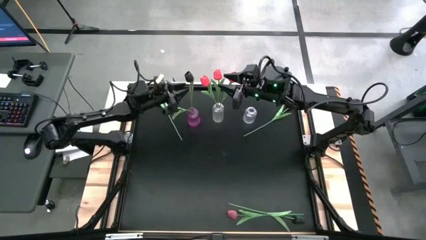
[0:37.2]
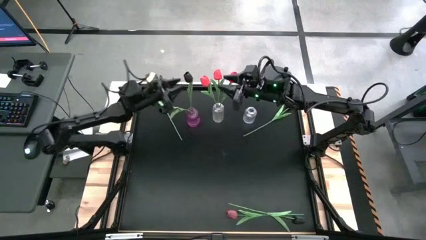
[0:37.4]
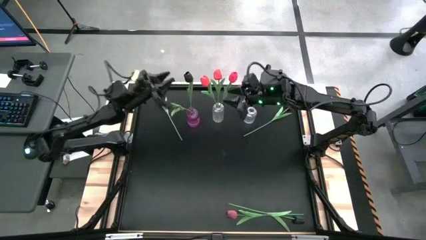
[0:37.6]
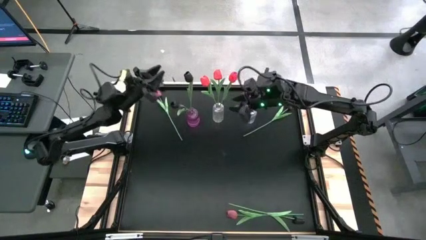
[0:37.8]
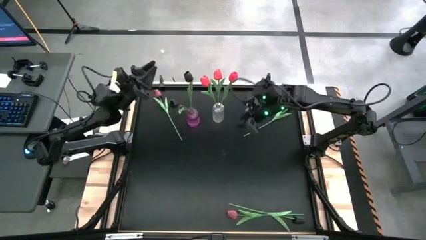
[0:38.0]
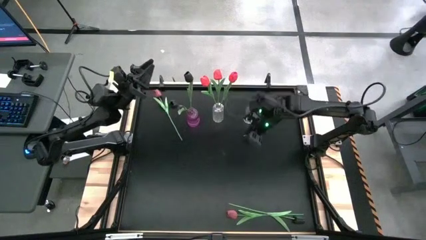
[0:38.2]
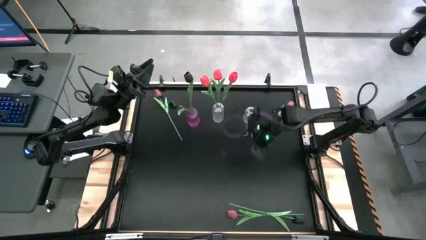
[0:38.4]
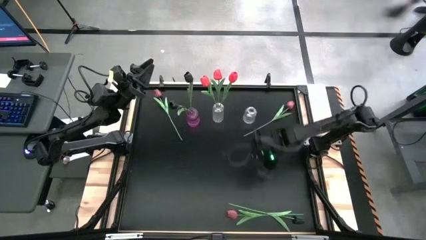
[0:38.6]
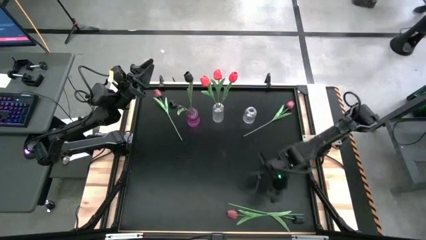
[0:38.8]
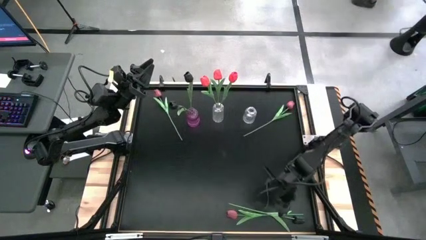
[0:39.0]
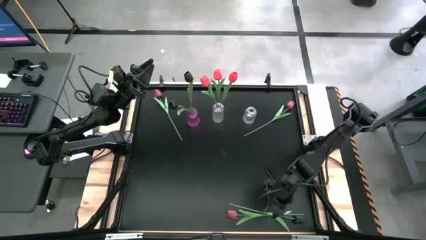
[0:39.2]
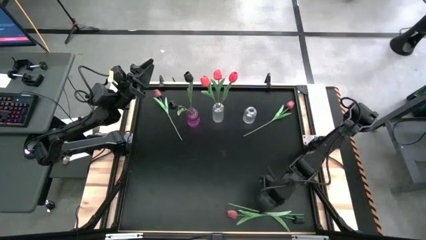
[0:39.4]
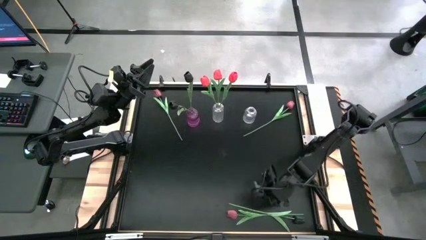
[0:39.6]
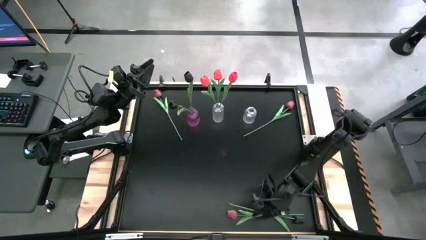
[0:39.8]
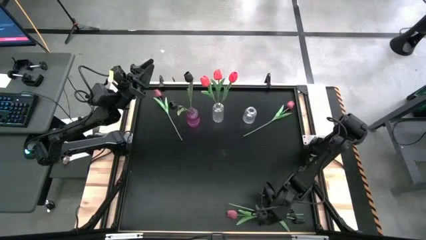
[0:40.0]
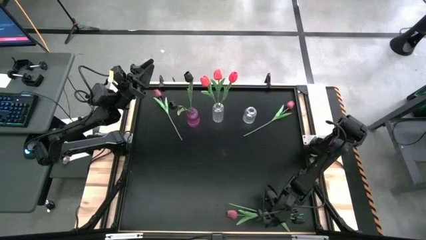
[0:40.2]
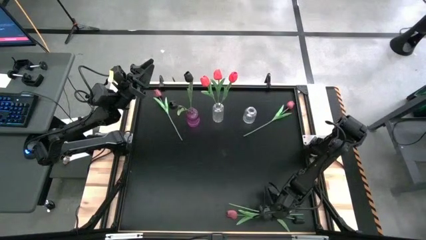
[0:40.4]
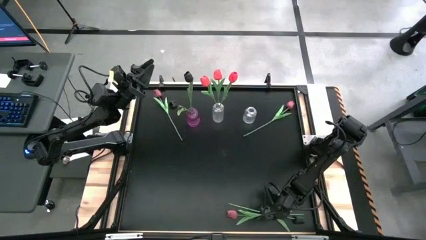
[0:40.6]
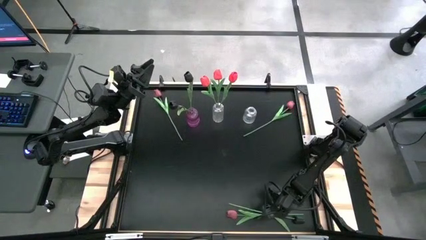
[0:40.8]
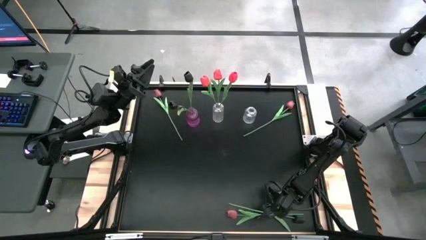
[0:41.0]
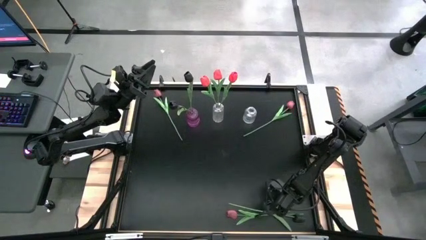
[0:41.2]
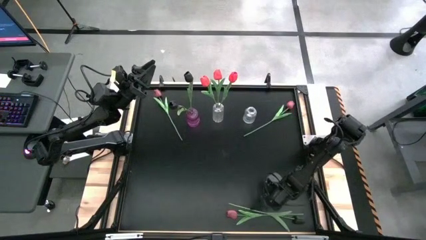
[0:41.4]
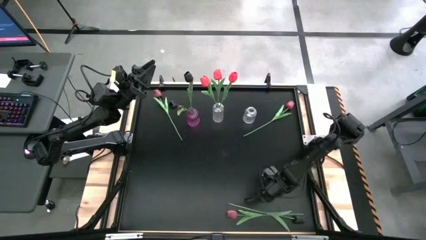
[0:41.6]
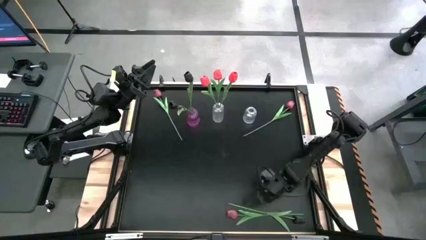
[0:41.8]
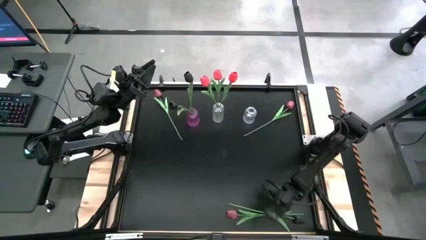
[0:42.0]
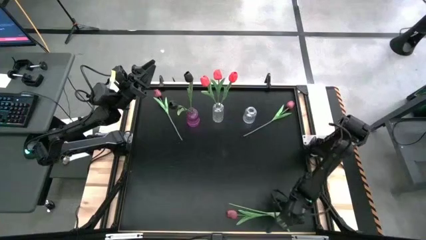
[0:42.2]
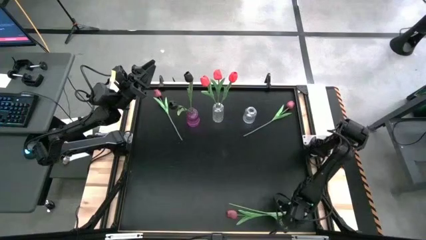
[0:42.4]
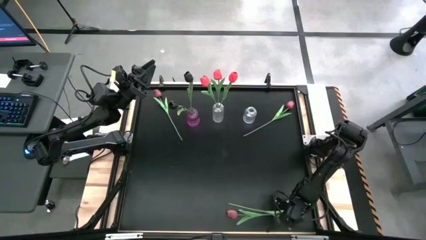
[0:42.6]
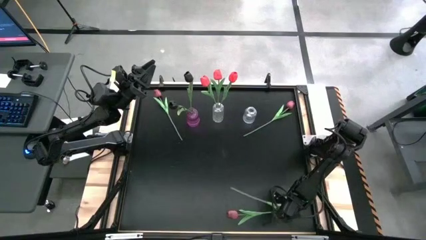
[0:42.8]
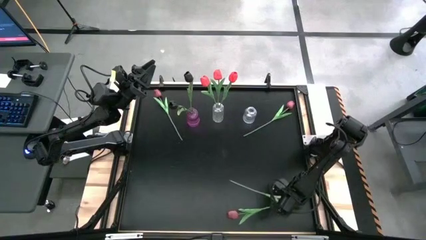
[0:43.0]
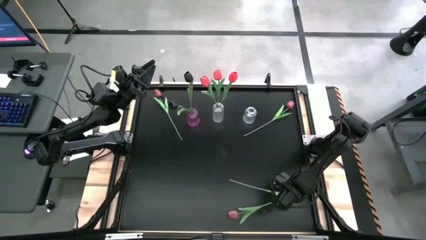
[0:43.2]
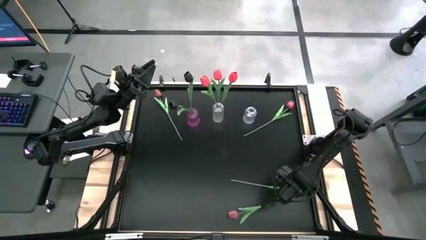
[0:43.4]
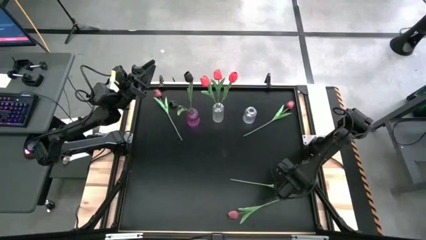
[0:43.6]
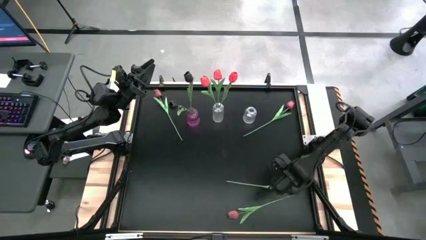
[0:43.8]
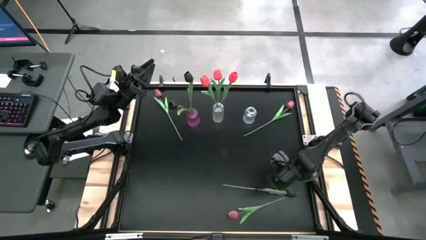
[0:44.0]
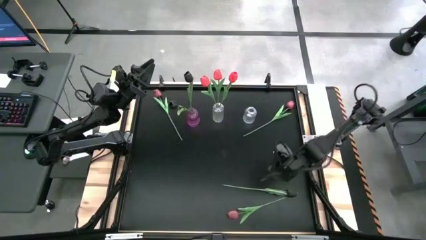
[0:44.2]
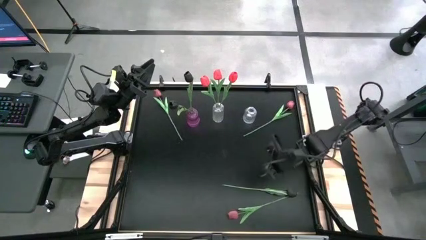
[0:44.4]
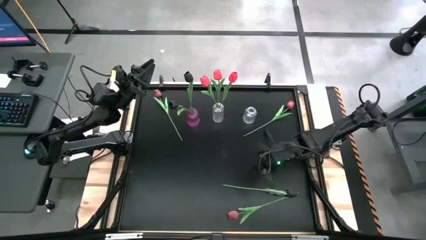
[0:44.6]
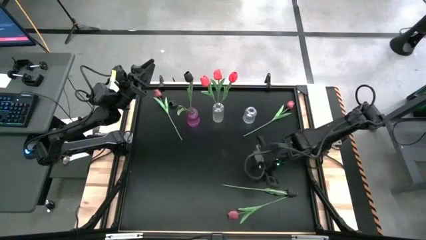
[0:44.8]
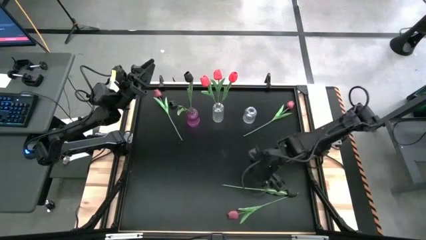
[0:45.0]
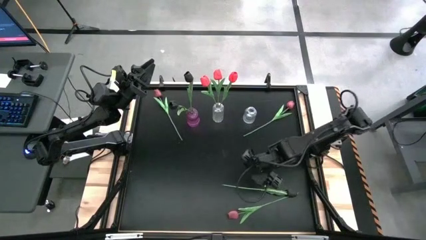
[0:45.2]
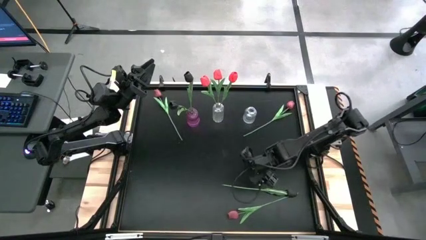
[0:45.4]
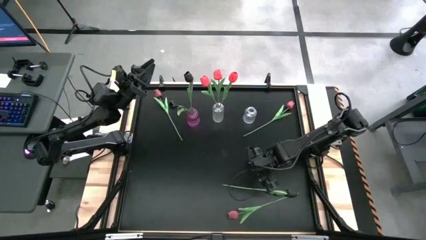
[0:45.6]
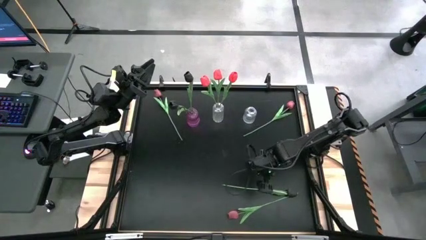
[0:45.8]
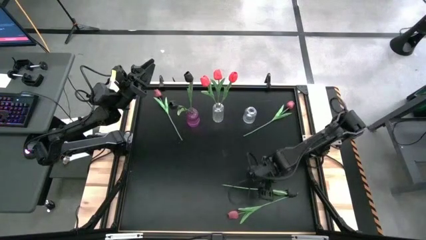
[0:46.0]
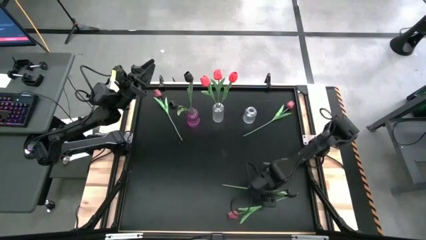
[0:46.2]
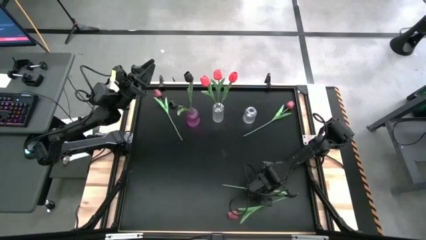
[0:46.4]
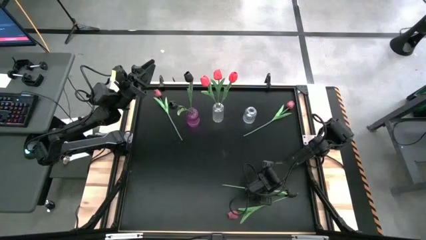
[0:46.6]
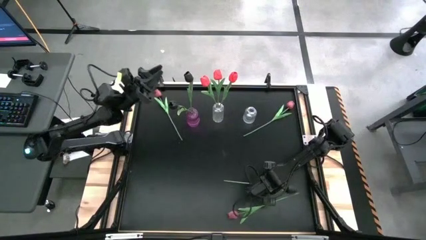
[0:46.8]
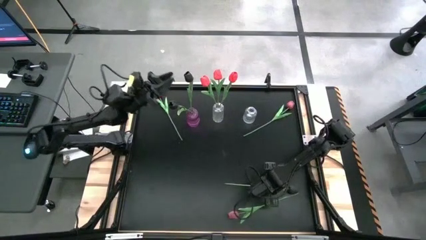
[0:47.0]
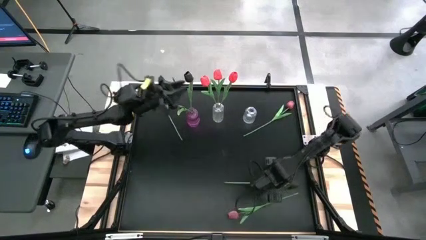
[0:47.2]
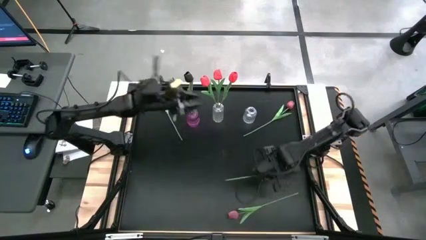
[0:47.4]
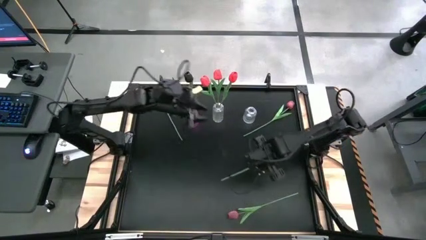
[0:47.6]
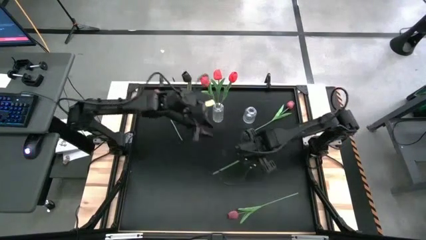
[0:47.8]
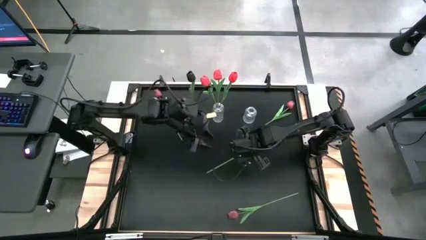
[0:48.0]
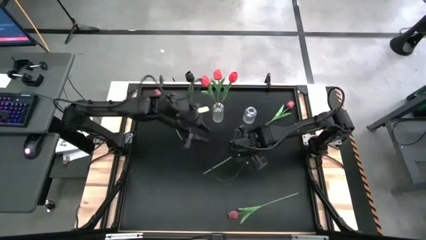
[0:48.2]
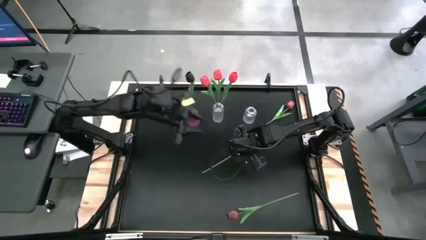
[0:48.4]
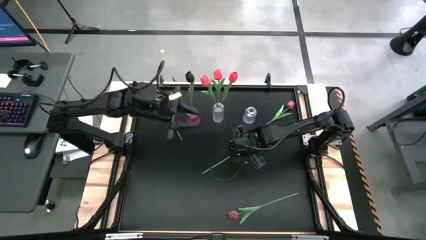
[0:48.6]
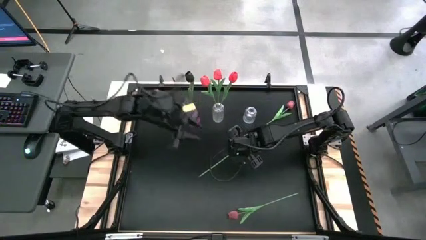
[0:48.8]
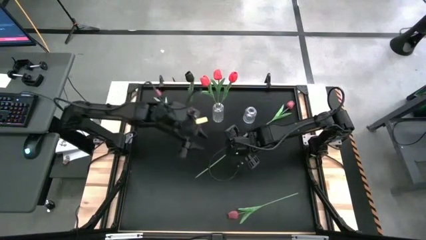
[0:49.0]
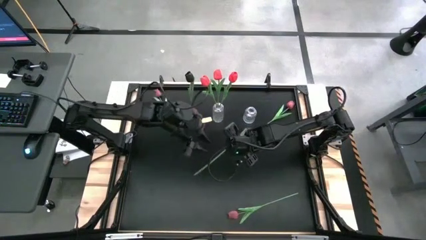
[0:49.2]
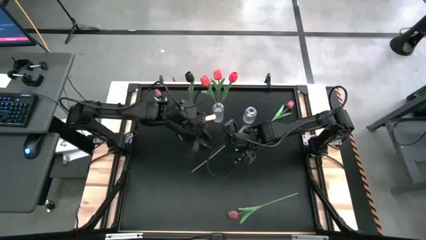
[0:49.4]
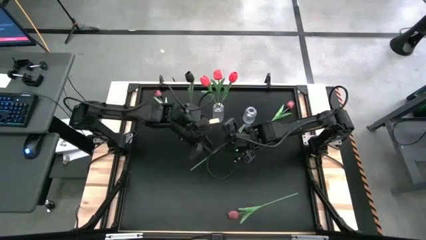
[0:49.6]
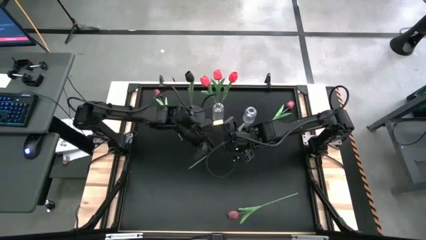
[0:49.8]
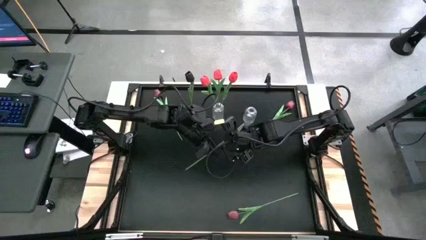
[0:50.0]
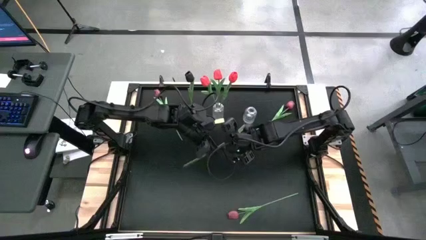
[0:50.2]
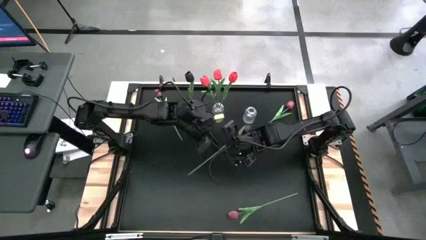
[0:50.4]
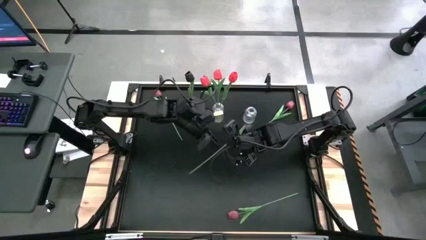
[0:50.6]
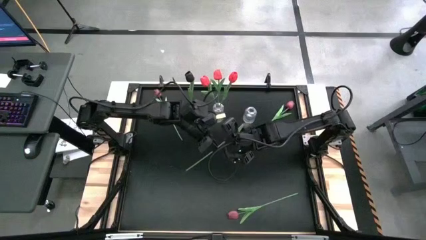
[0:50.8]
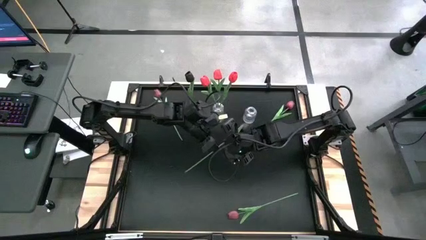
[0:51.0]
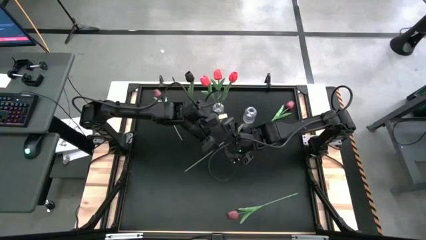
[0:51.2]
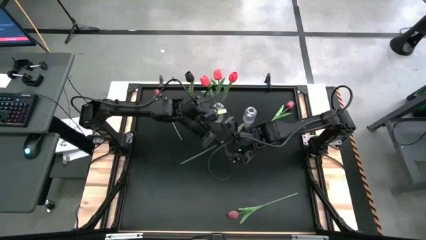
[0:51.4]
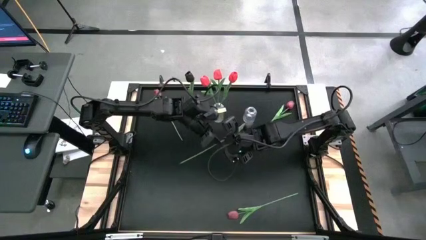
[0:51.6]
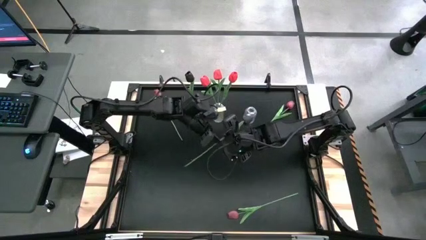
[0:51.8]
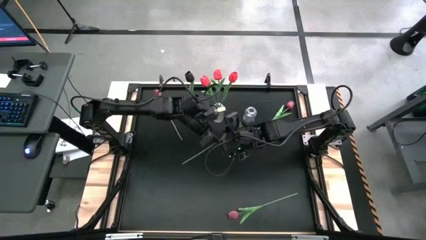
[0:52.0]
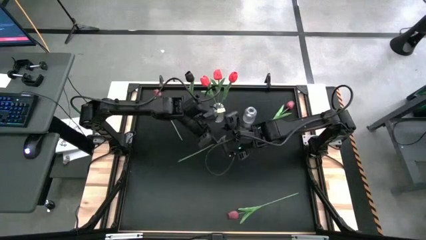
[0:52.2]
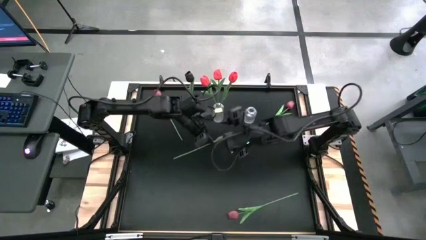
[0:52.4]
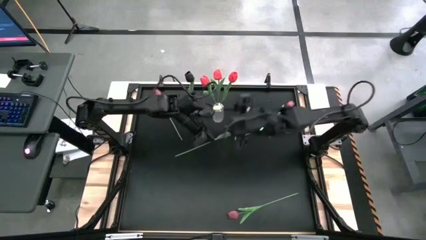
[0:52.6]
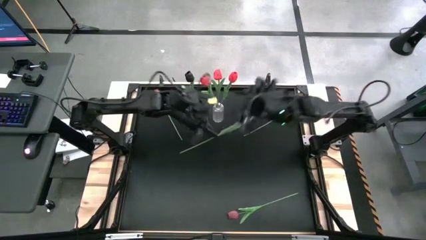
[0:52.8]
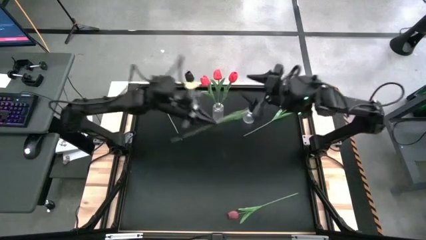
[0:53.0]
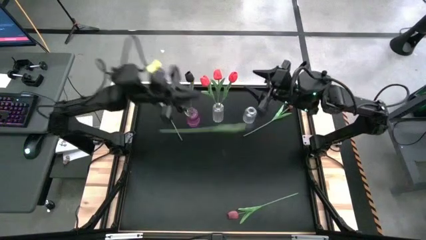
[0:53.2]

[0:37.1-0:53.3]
Task: Sort flowers into vase by color
Put the black flower into the violet flower vase
